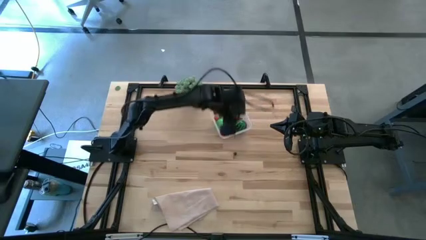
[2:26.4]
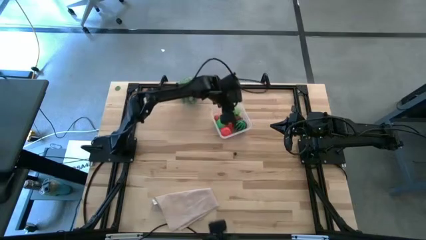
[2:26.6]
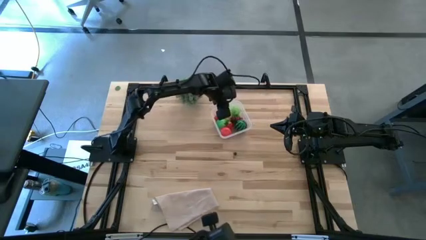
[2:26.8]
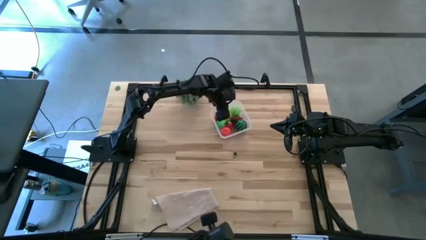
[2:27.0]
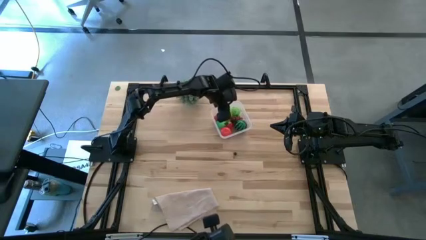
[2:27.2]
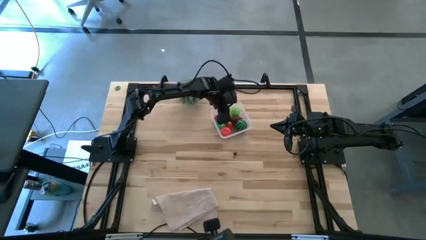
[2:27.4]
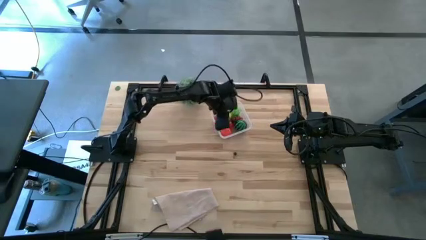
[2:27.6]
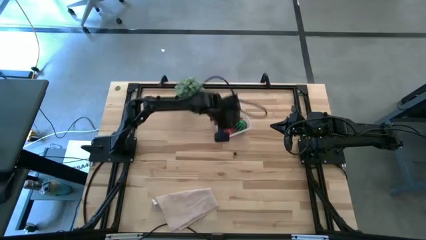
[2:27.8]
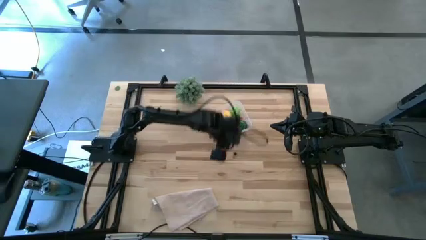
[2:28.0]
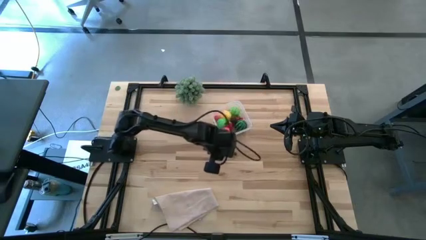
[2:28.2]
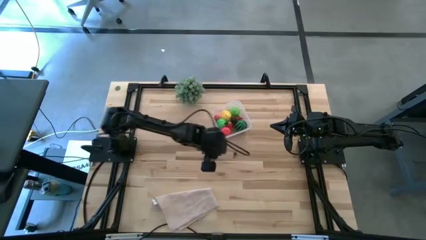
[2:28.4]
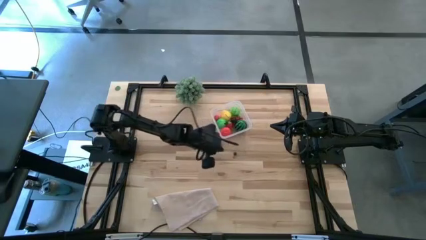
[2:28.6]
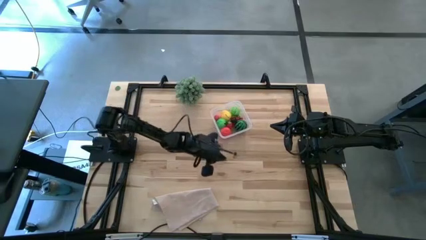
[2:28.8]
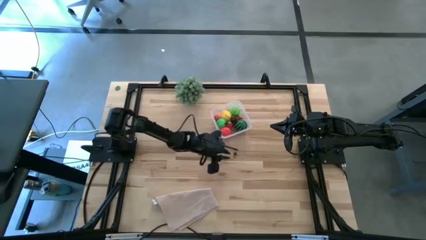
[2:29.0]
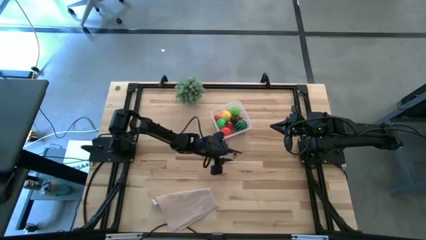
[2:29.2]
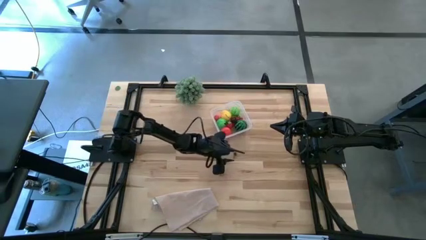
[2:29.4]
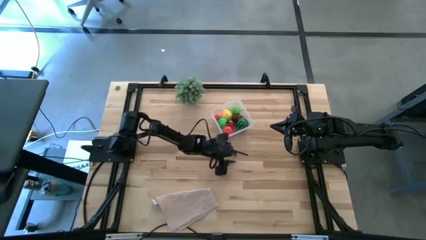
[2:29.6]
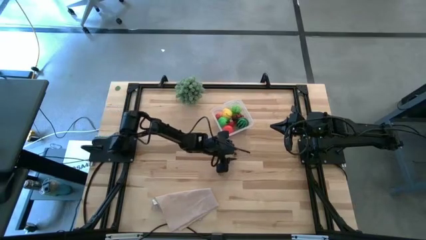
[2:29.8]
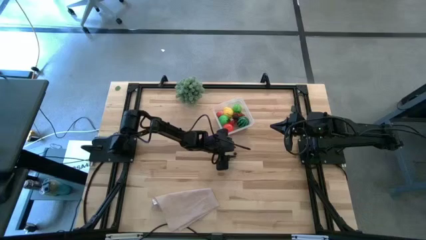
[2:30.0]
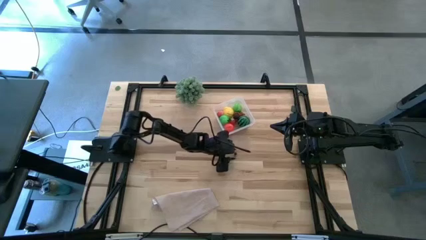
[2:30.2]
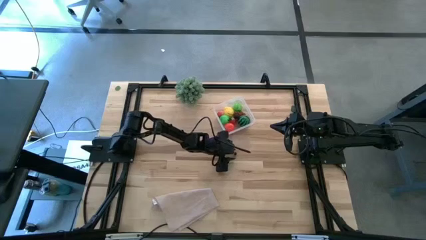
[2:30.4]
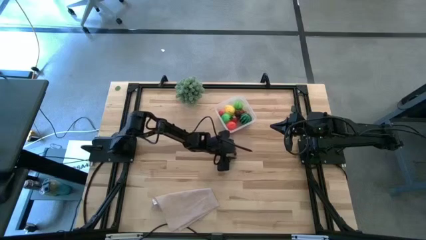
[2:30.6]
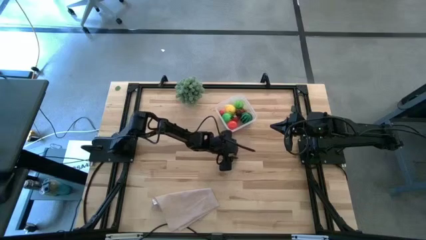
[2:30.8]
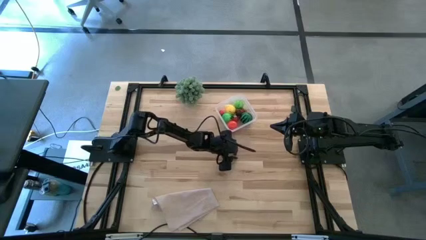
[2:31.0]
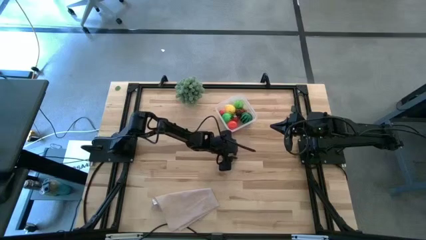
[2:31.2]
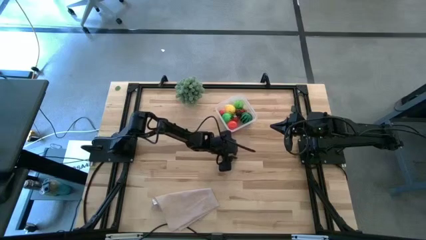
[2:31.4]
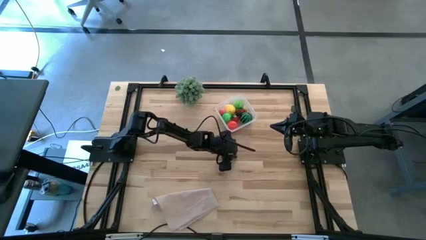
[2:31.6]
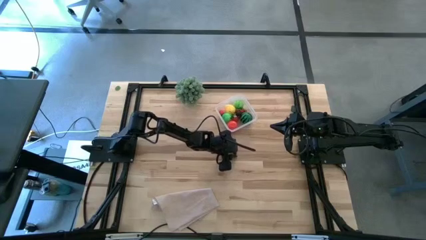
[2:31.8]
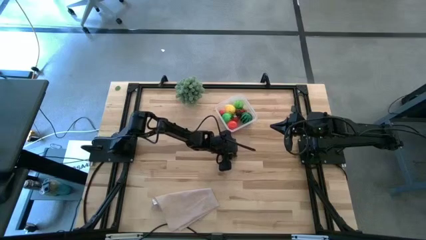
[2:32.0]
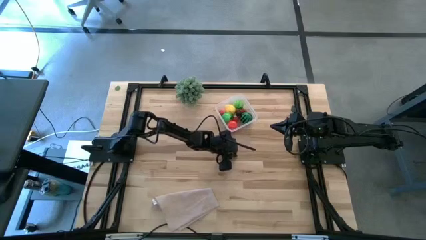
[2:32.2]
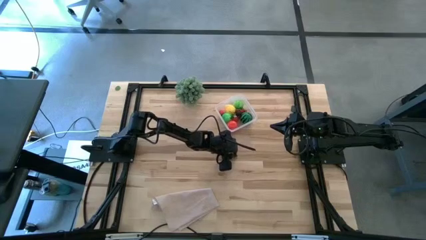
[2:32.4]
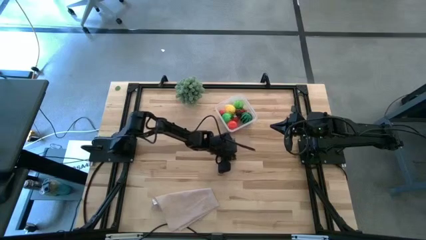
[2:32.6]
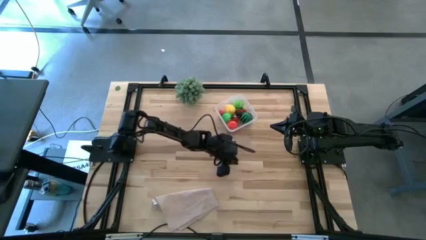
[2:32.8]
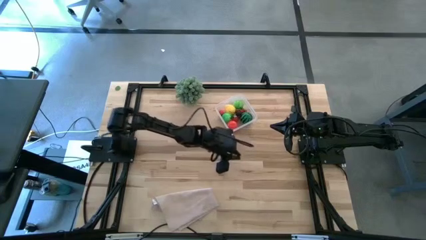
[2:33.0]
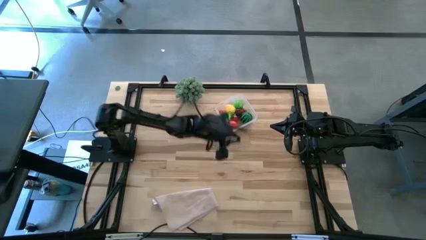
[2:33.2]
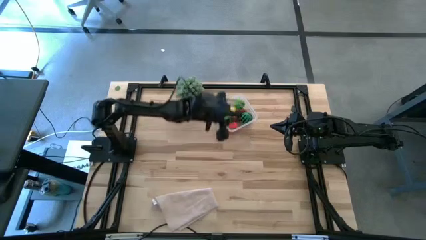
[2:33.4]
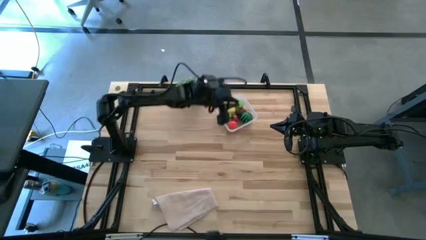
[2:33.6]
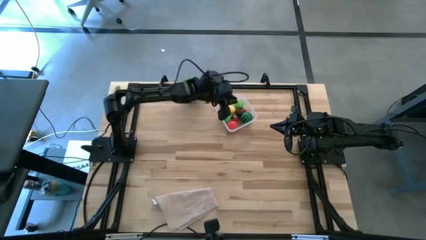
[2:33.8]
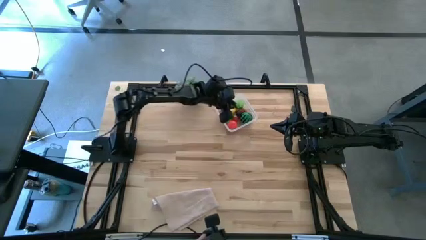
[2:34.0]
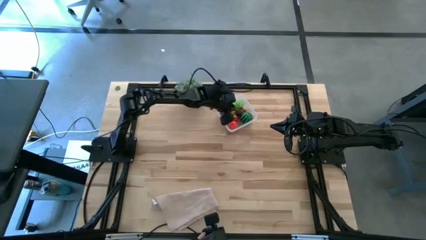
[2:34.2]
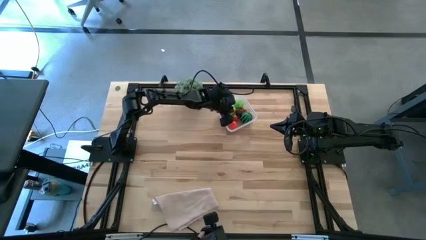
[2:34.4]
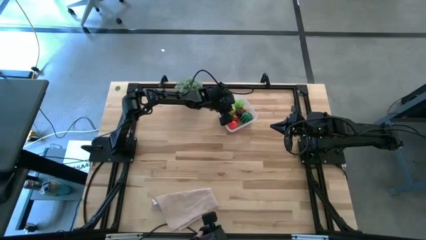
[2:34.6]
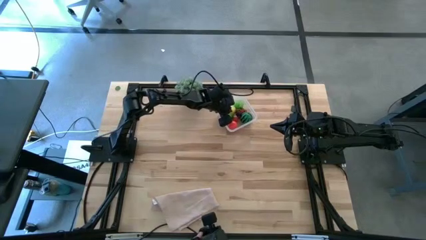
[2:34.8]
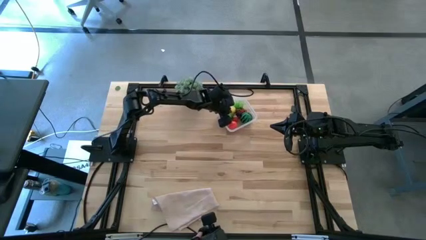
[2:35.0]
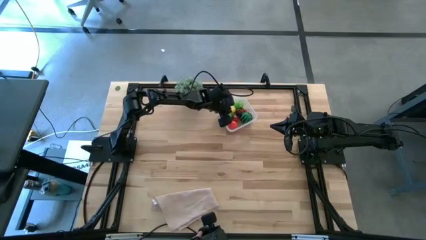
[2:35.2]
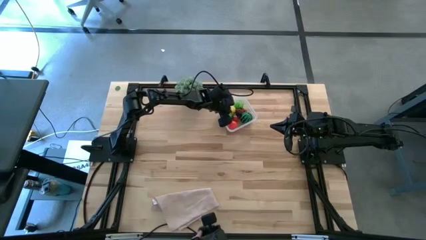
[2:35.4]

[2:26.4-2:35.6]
Task: Pick and placing Produce into tupperware
Put the blueberry into the transparent bin

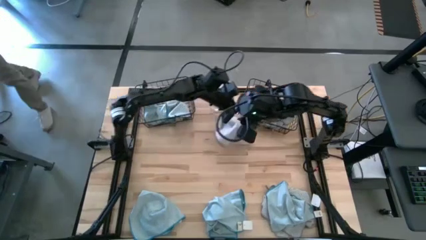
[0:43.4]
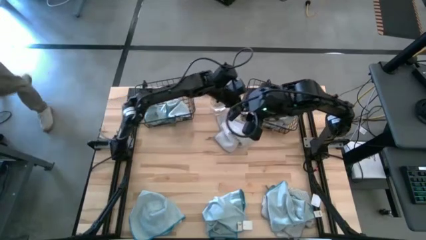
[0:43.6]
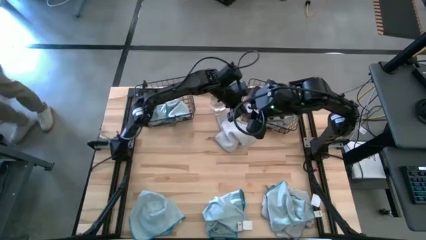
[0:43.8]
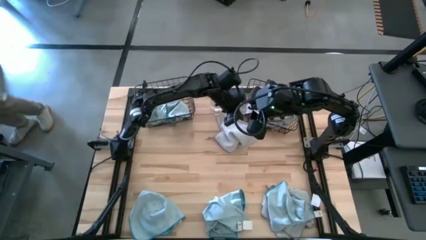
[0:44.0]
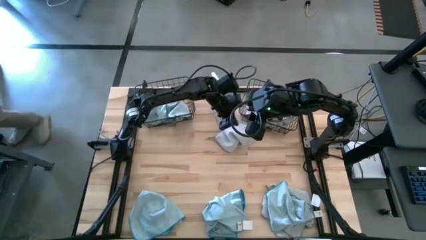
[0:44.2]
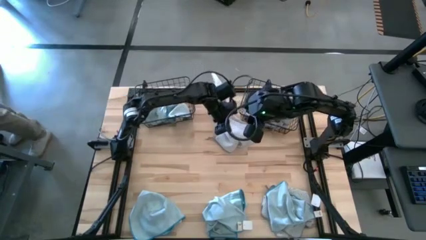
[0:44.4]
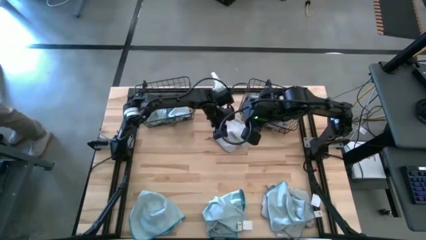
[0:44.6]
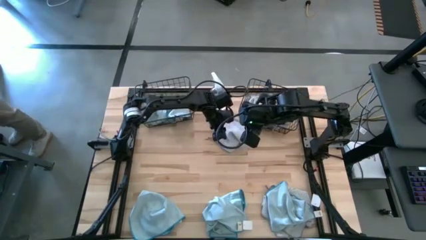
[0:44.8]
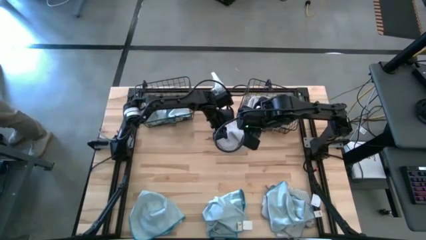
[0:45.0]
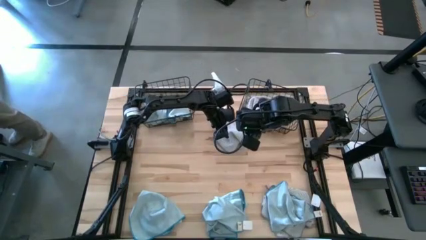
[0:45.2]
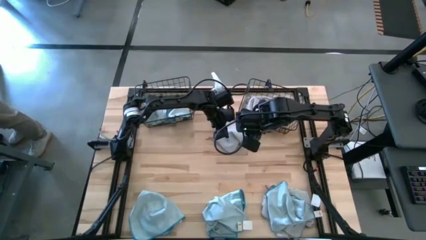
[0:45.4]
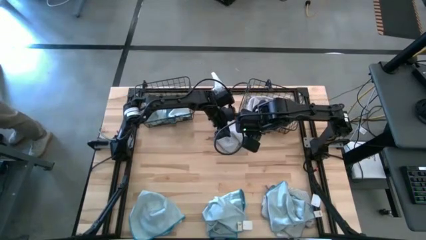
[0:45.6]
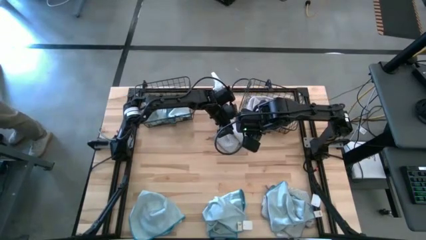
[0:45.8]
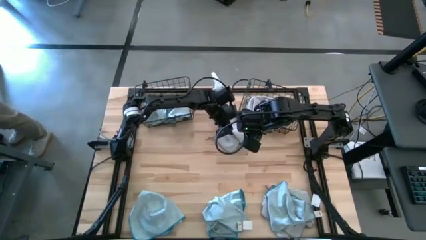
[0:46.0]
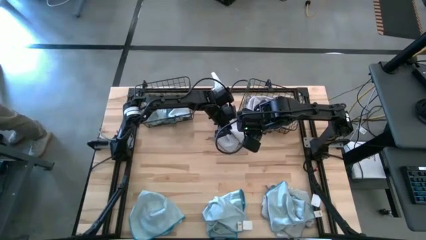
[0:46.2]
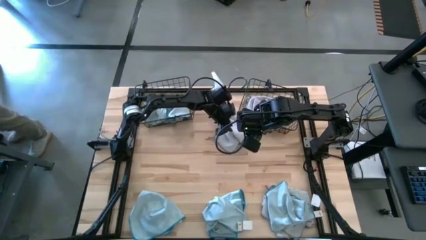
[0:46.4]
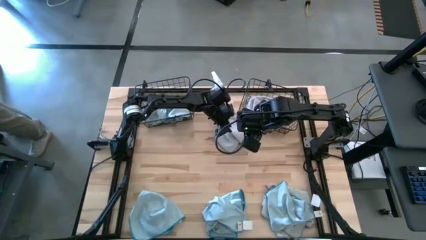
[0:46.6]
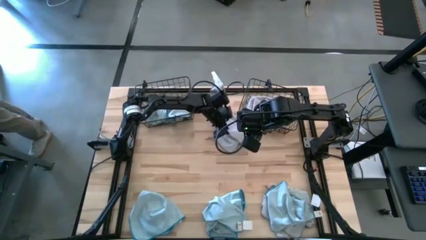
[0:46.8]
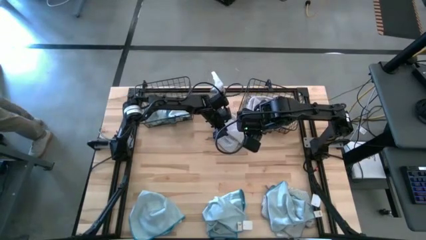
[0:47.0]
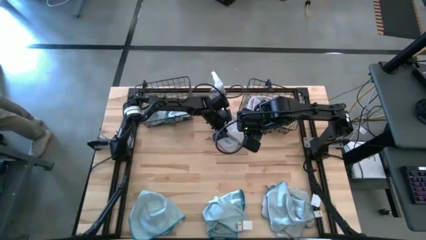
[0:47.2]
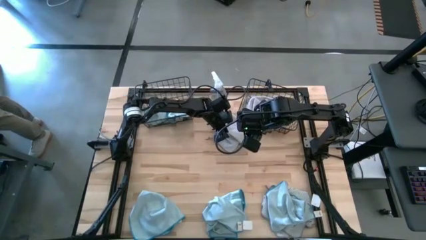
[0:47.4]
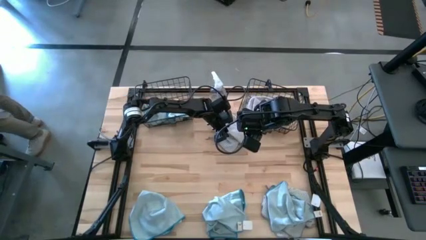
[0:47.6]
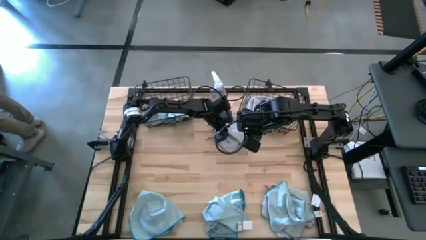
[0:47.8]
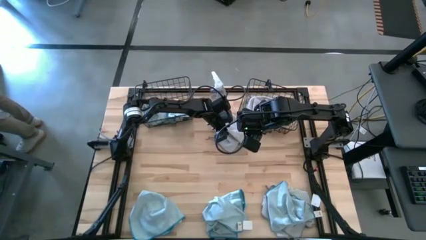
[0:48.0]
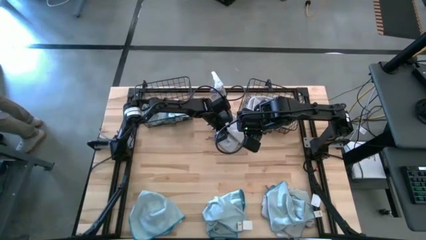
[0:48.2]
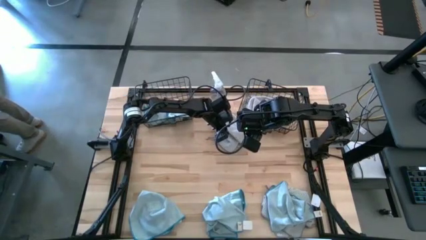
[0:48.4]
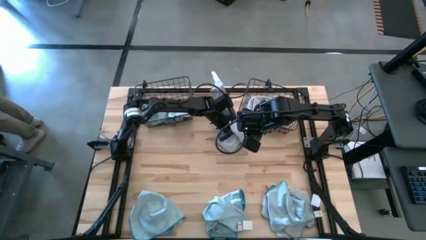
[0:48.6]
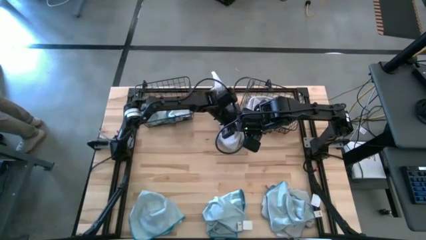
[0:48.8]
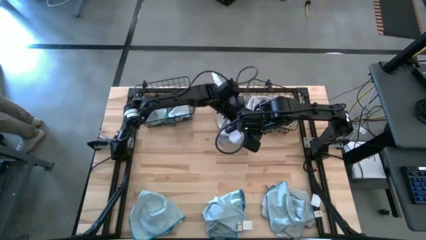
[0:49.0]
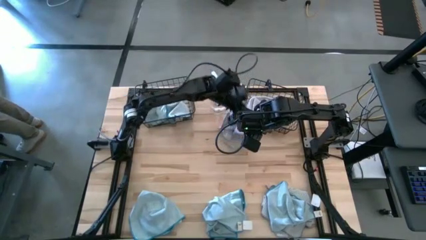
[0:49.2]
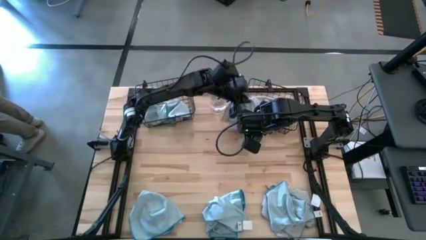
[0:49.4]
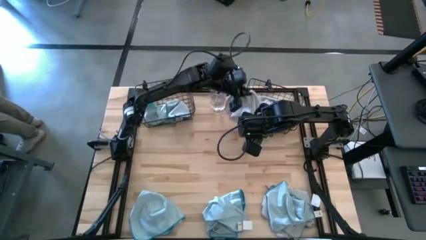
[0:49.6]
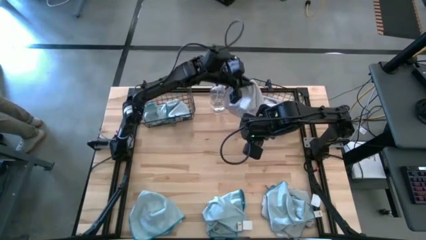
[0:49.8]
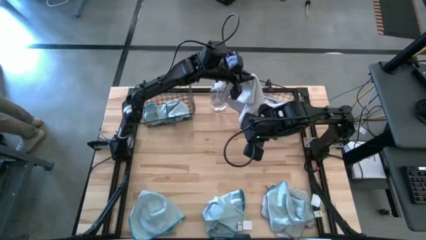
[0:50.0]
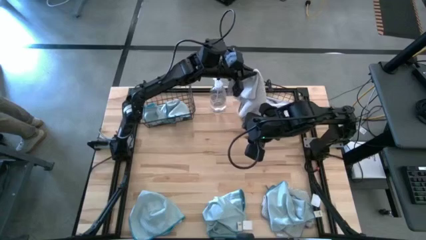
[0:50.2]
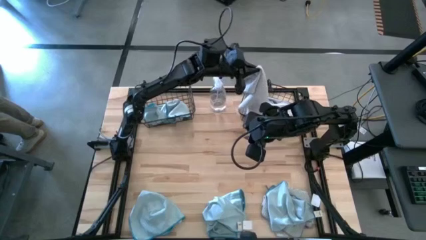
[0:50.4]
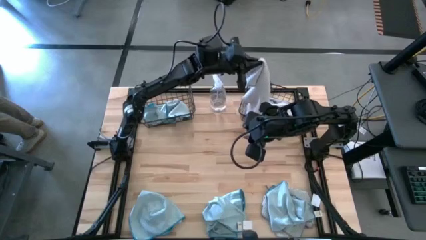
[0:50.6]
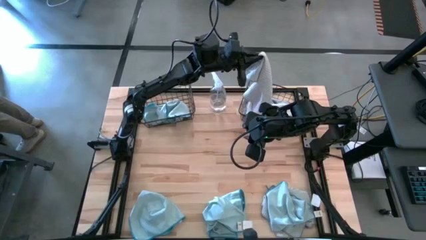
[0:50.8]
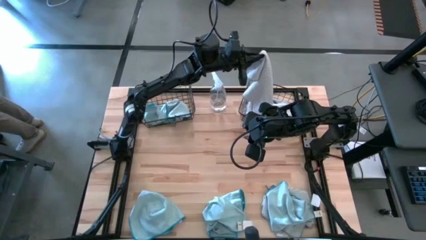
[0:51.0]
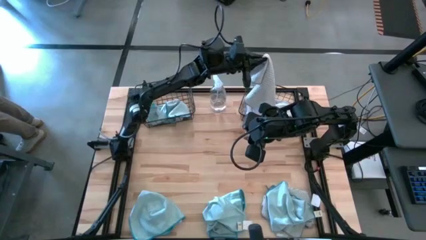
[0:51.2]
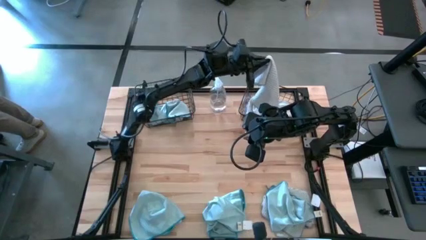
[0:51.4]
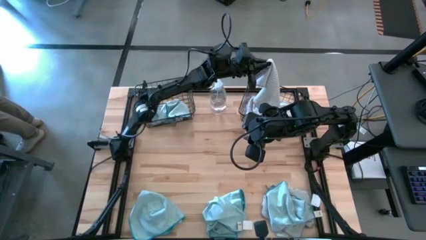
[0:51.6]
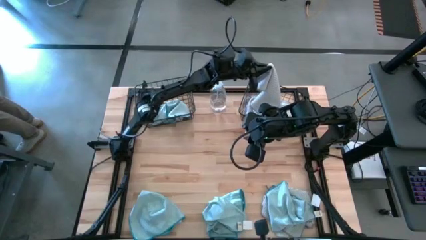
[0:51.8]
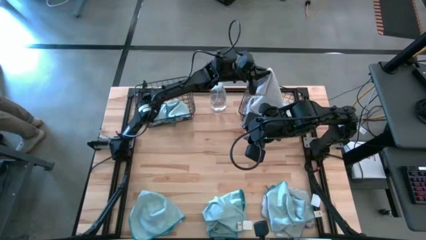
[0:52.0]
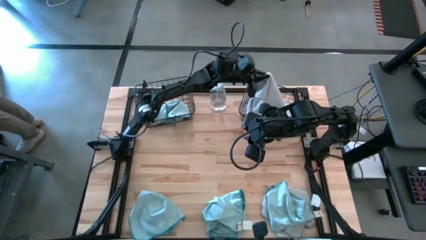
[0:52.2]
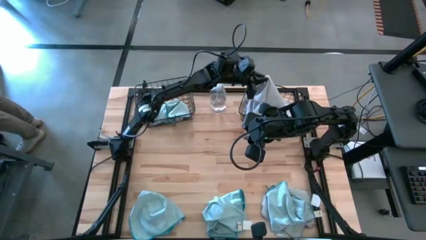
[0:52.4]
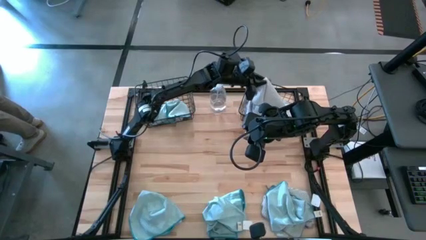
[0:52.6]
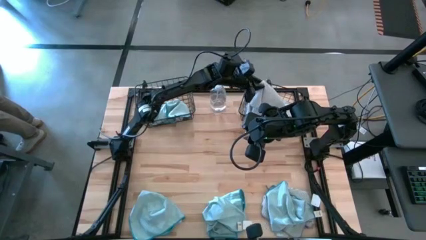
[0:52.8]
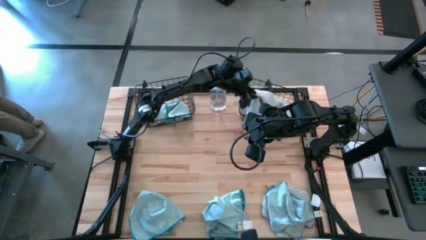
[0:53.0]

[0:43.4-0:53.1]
Task: Sort microfiber towel by color & place in baskets
Put the gray microfiber towel into the right black wire basket
